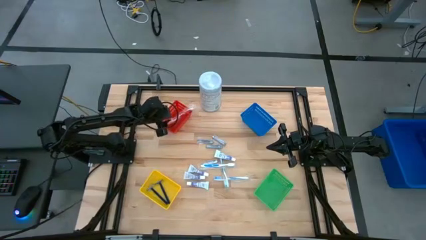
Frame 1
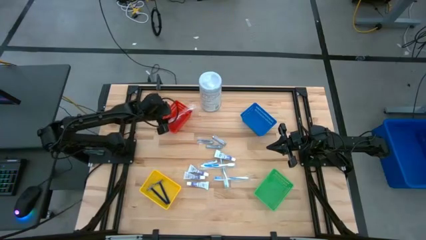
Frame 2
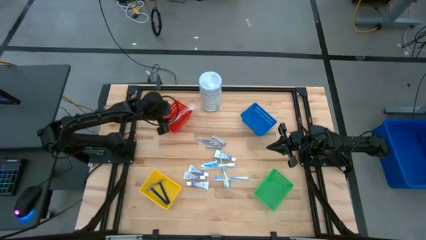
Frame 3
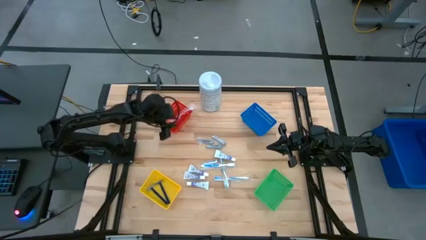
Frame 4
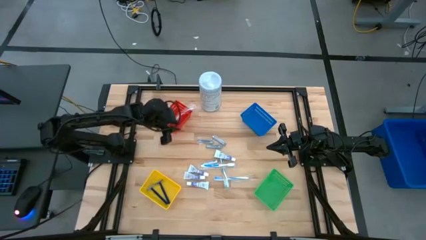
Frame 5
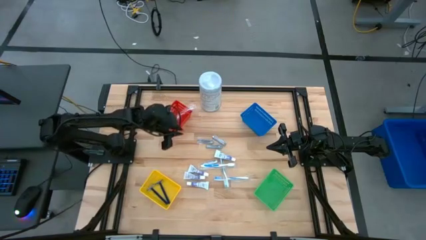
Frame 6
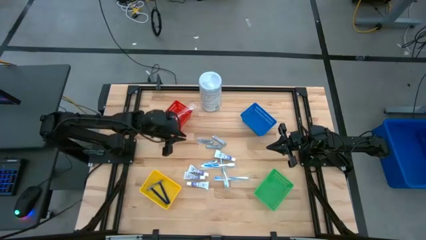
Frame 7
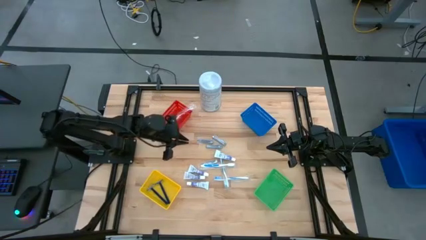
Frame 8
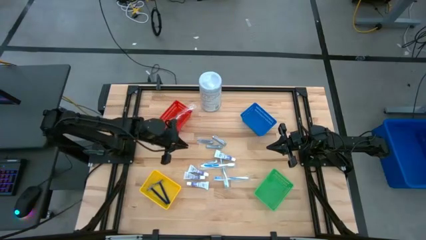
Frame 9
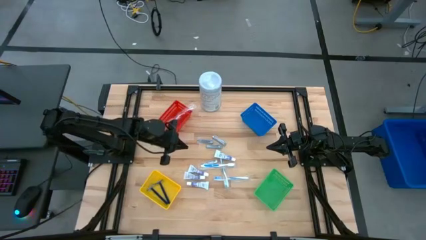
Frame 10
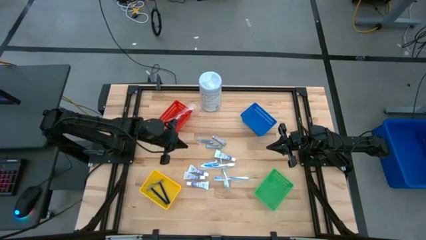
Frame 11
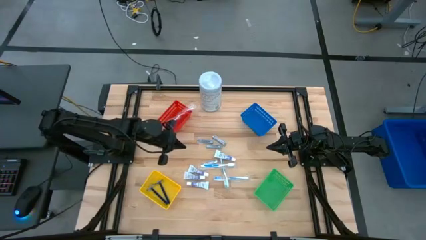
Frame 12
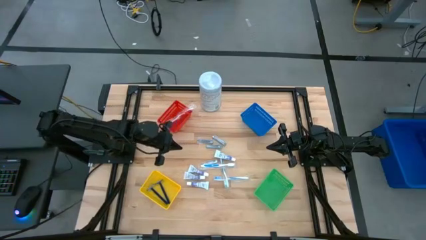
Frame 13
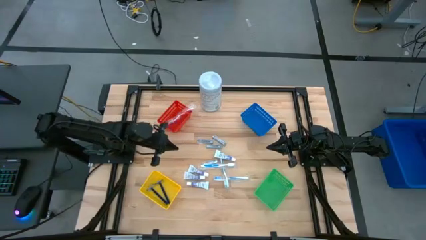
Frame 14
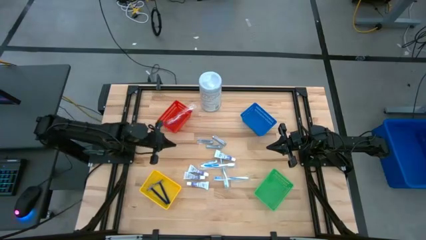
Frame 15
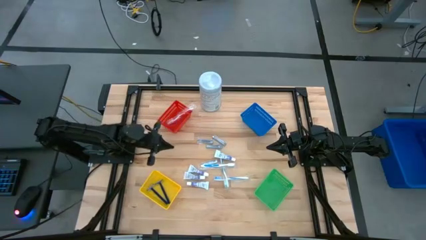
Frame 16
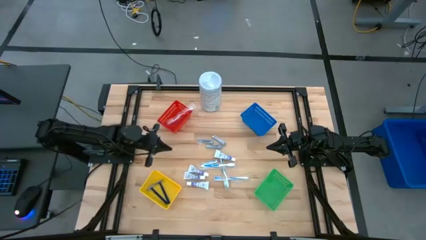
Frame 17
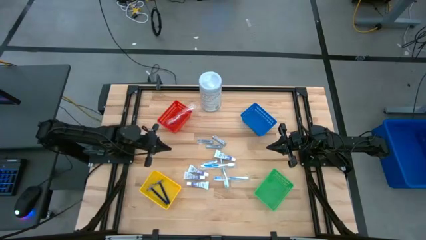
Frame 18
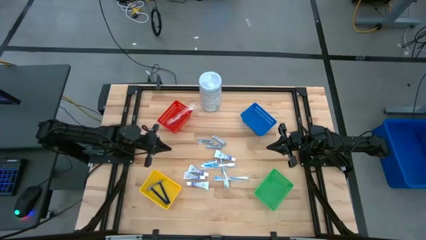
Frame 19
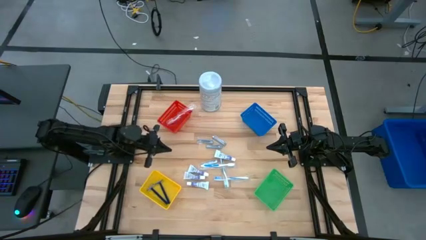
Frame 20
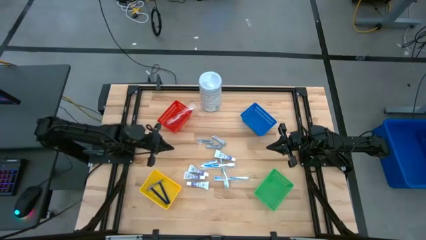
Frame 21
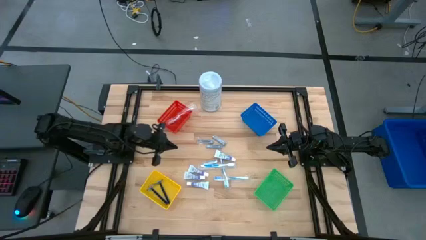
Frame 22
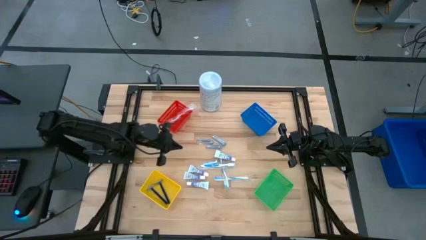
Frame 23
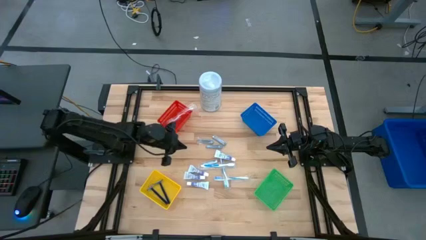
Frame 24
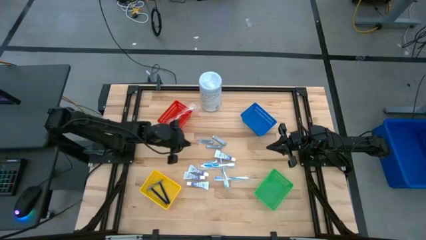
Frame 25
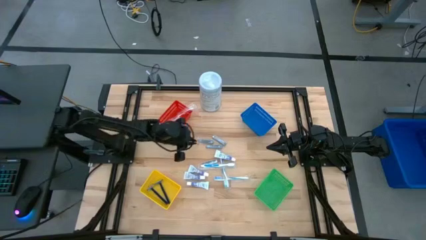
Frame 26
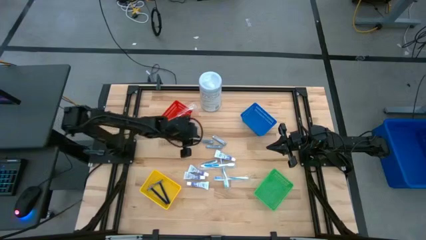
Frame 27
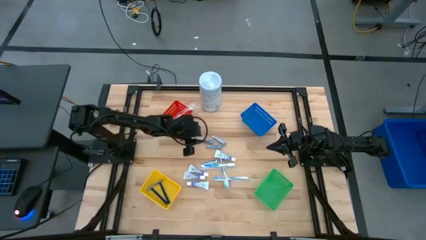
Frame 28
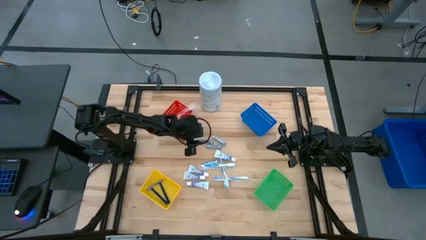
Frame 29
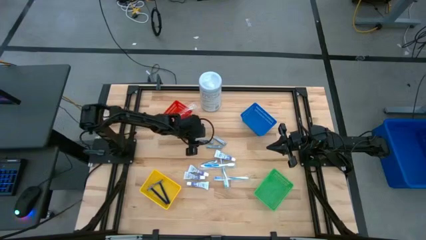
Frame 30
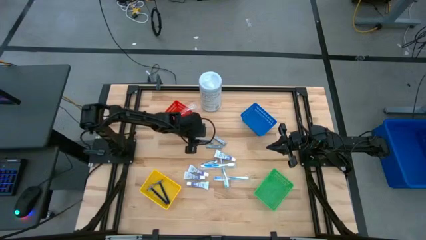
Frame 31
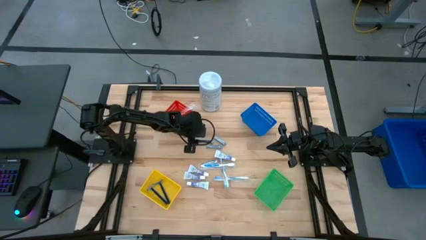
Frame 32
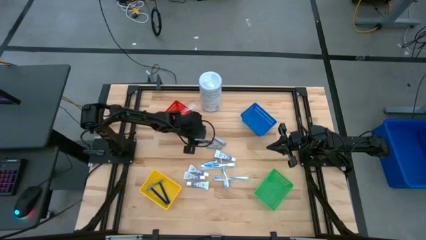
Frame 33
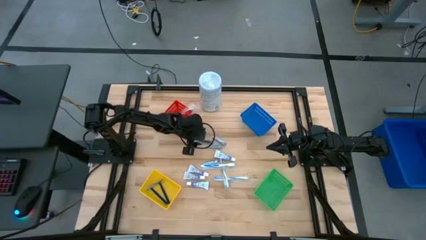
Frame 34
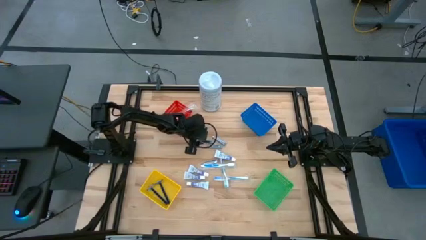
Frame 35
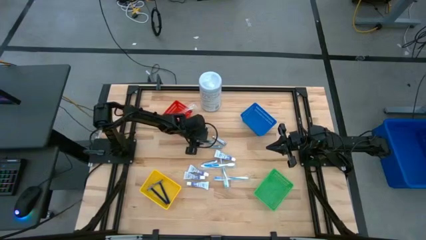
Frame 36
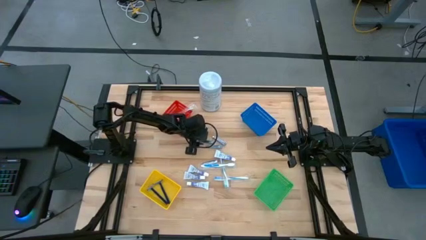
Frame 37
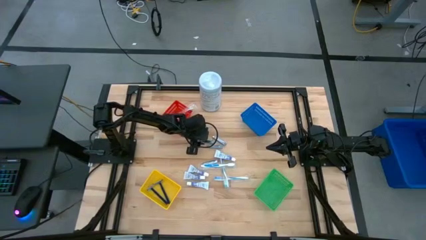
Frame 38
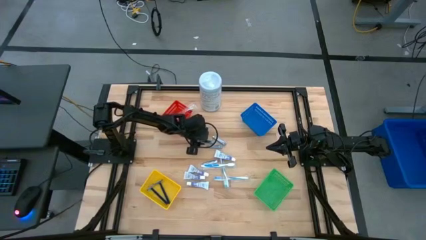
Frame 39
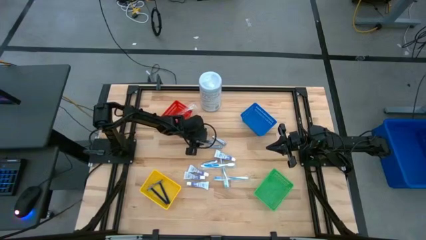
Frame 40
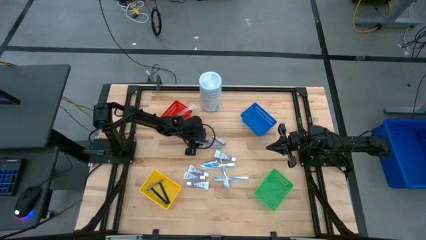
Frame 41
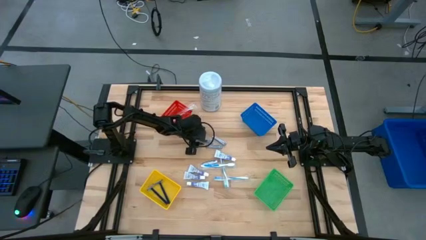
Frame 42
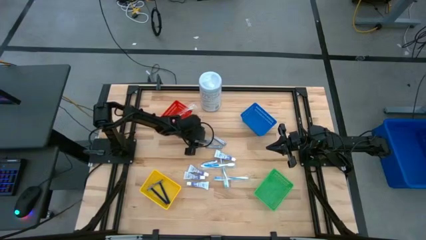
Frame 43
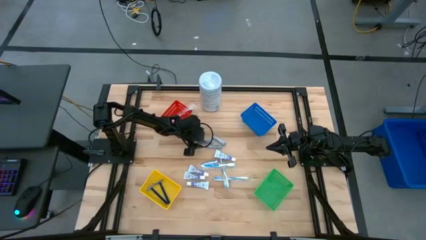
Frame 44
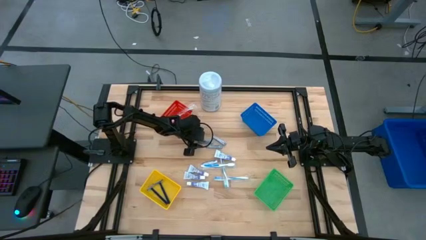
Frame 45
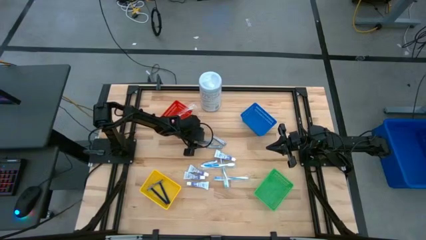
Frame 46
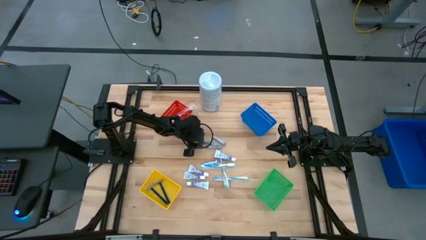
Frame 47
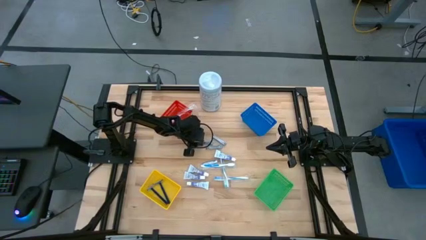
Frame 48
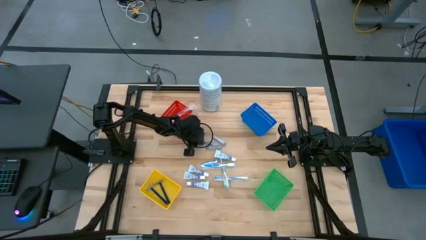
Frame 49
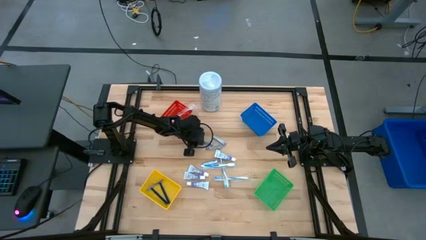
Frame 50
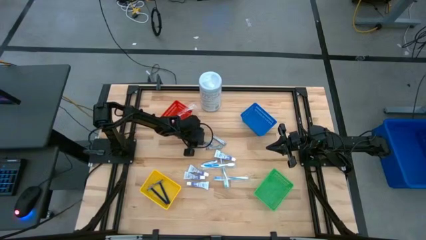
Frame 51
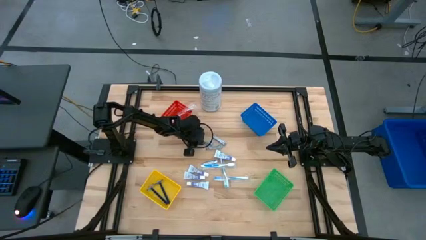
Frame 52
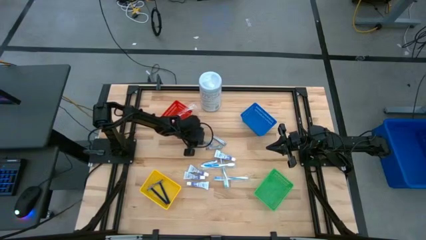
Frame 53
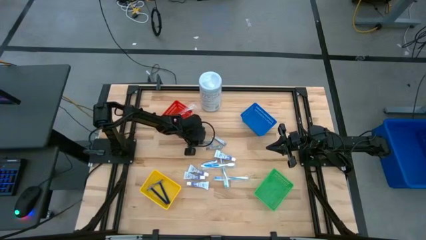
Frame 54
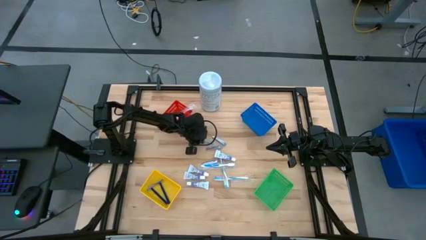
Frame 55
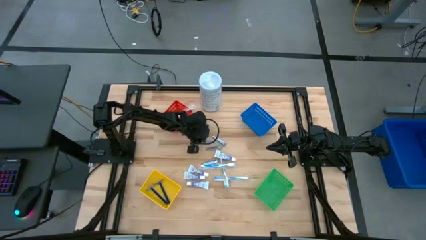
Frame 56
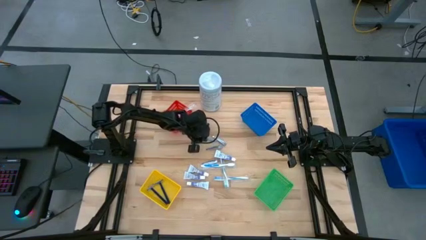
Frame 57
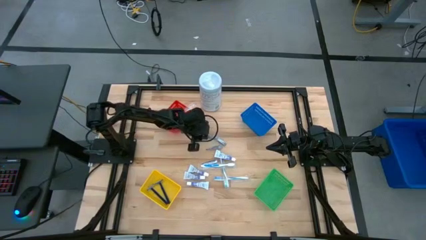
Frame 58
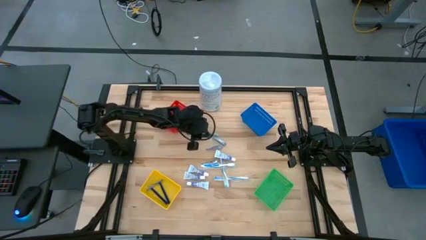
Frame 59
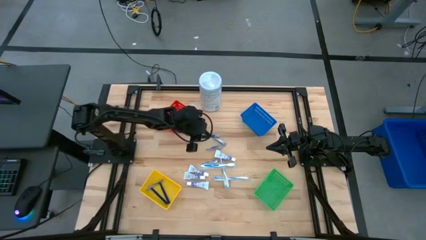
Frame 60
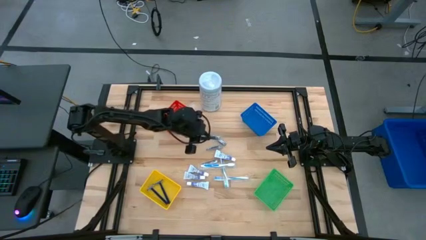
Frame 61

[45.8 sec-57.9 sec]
Task: Pick & Place Travel size toiletries
Put the silver nail clipper into the blue basket
